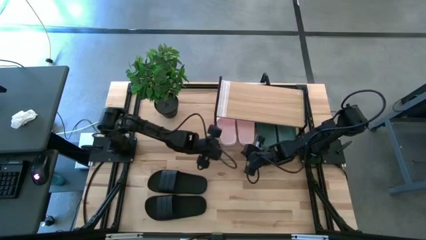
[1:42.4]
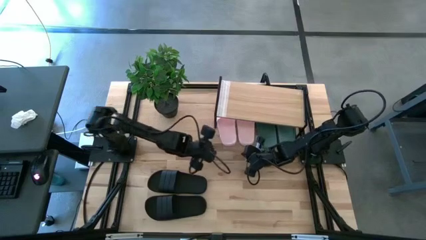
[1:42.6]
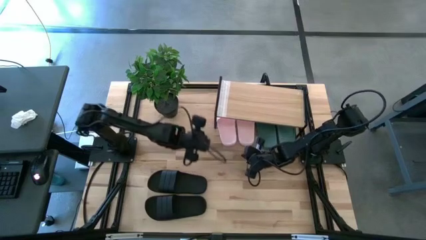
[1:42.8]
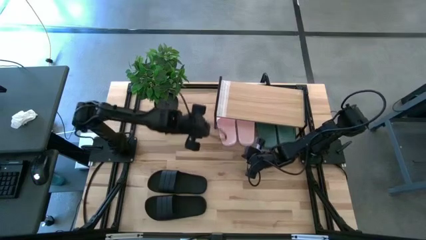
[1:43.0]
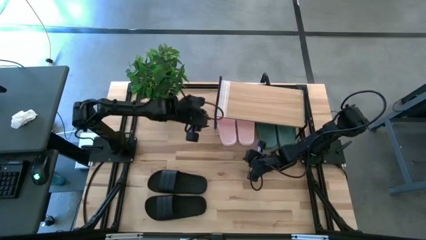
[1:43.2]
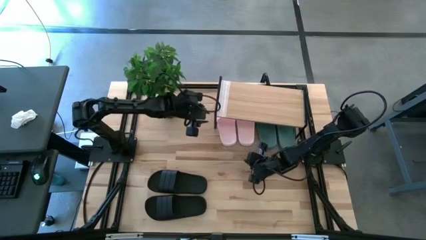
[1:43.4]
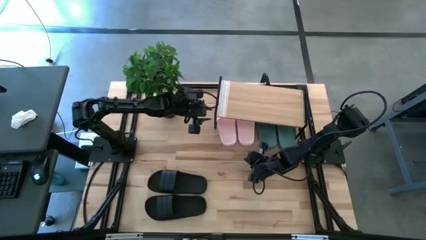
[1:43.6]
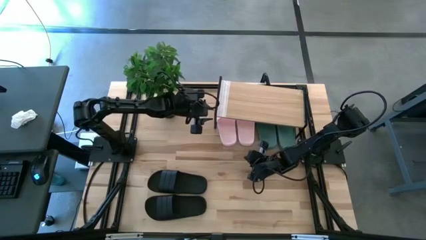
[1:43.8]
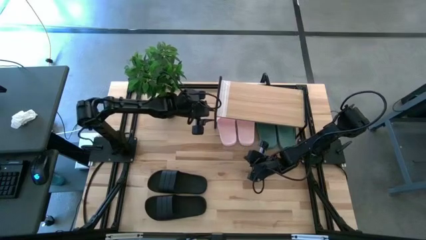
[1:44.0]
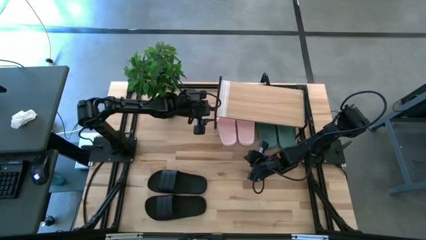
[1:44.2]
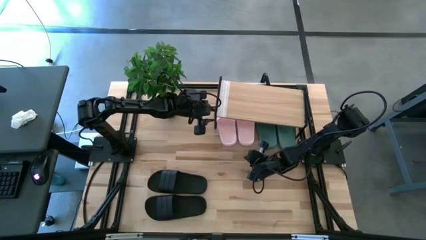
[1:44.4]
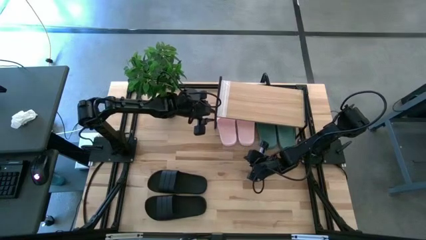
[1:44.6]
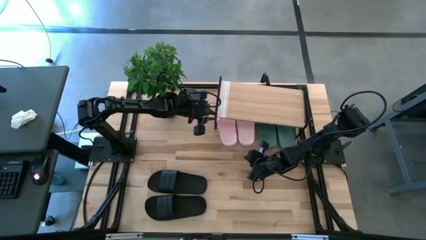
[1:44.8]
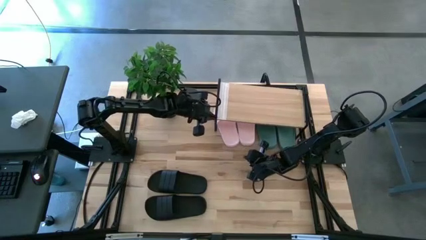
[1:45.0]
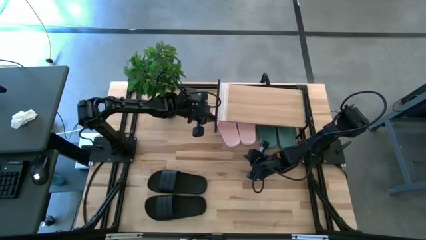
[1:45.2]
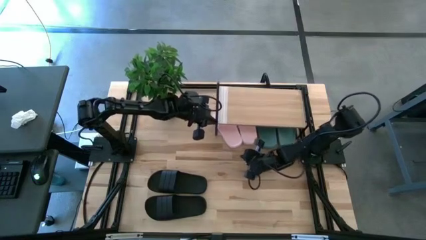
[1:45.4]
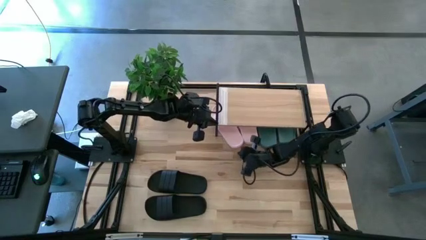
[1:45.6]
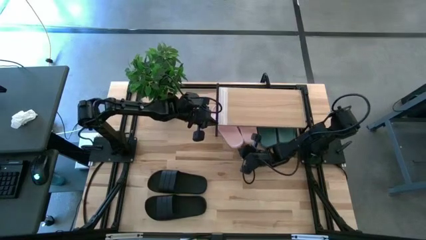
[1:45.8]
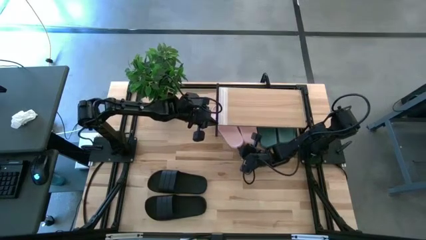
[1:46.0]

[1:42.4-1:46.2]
Task: Pick and place slides into the shelf
Adjust the shelf

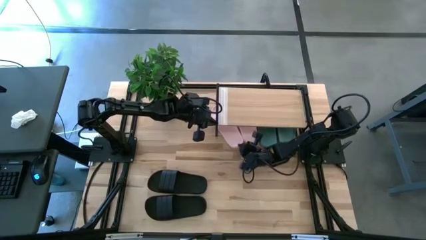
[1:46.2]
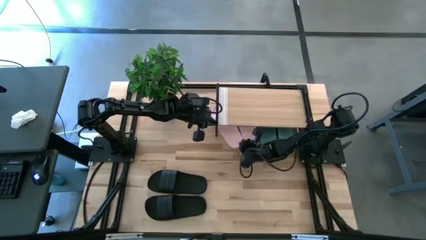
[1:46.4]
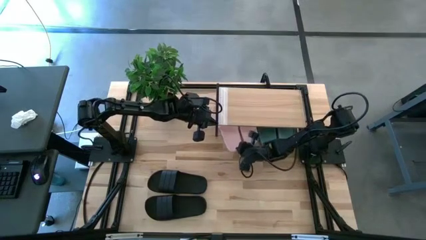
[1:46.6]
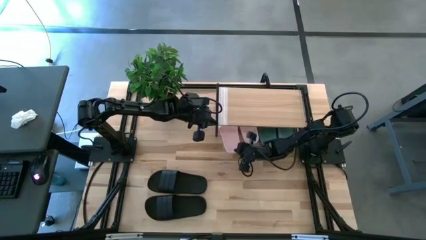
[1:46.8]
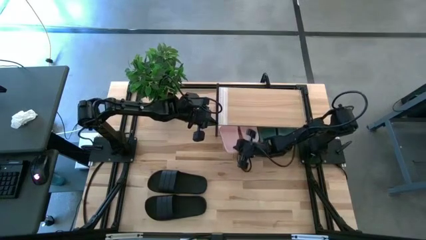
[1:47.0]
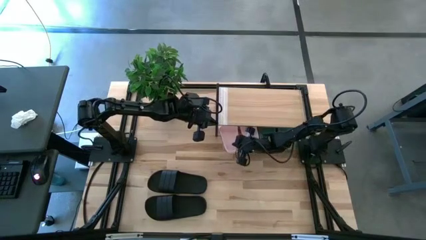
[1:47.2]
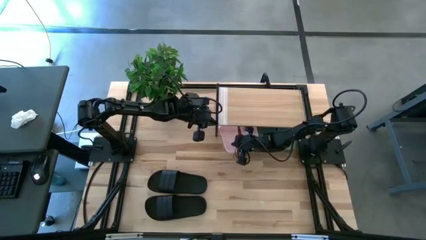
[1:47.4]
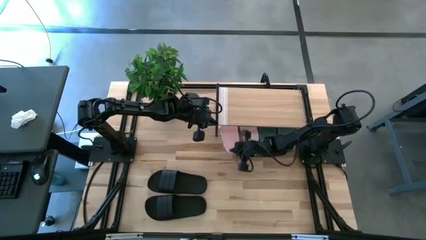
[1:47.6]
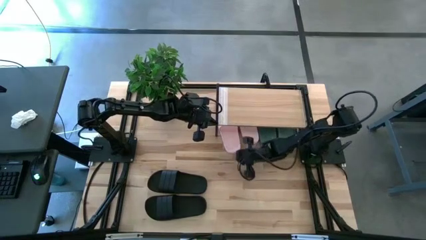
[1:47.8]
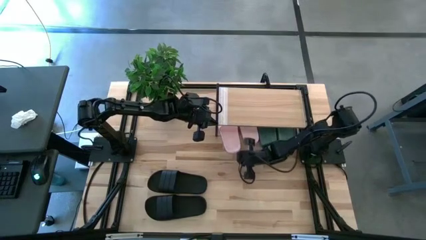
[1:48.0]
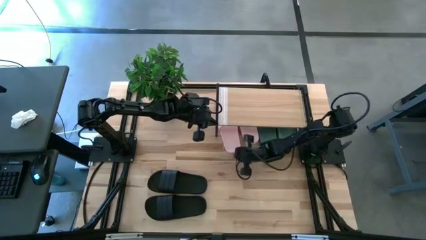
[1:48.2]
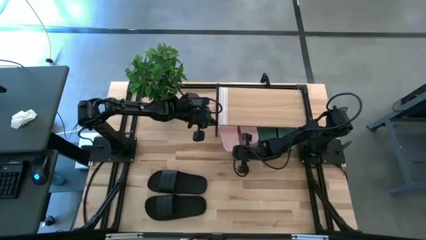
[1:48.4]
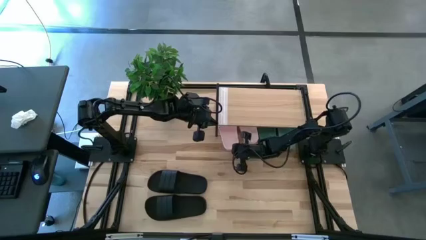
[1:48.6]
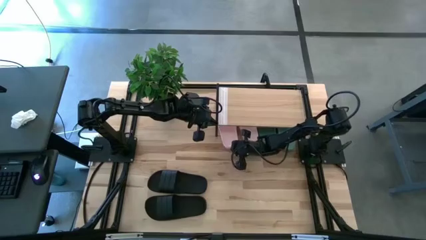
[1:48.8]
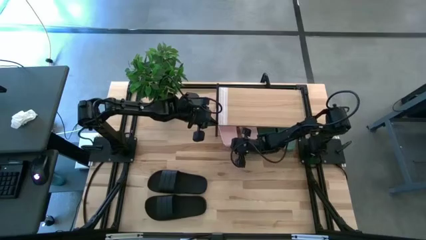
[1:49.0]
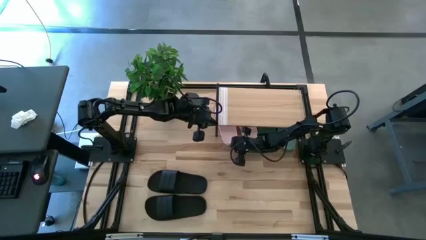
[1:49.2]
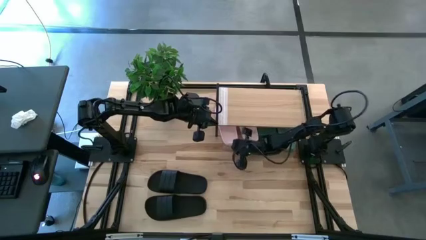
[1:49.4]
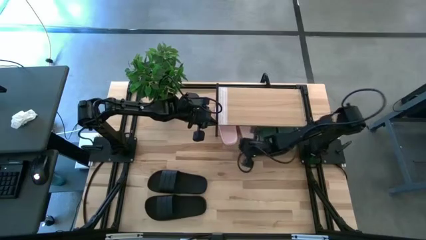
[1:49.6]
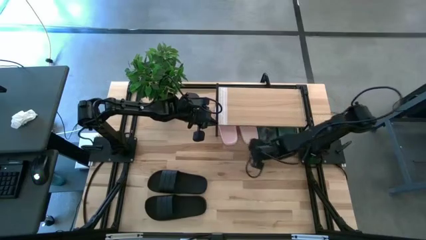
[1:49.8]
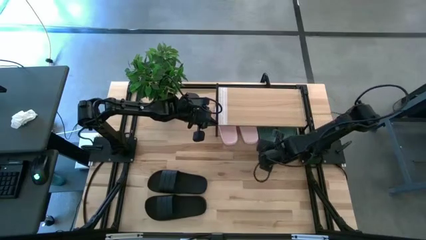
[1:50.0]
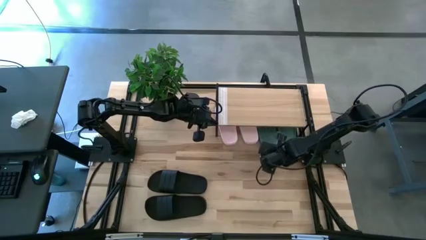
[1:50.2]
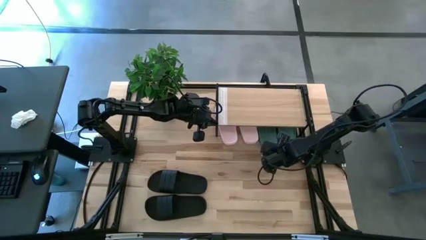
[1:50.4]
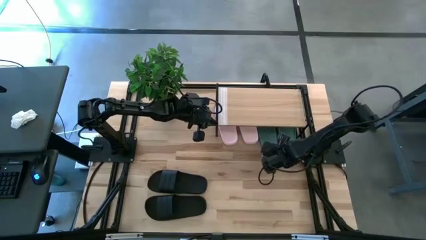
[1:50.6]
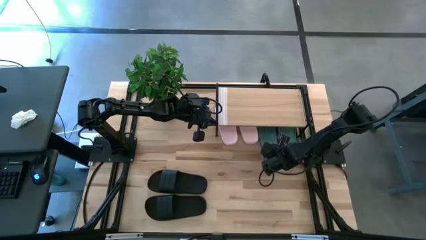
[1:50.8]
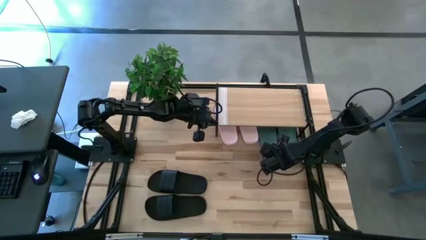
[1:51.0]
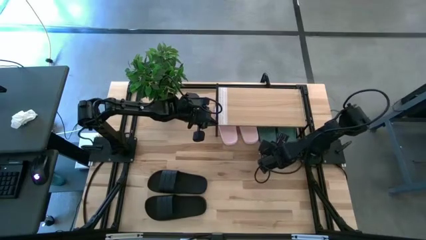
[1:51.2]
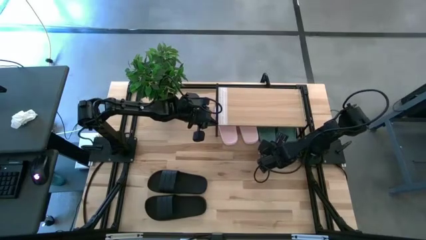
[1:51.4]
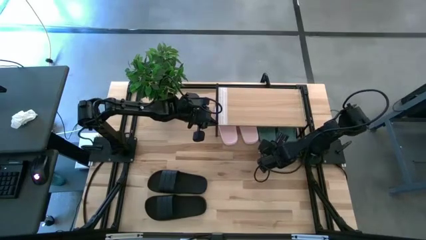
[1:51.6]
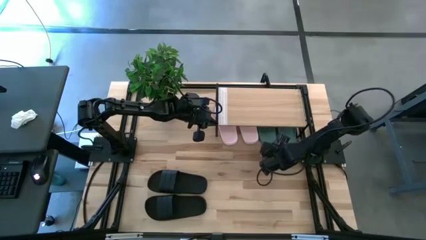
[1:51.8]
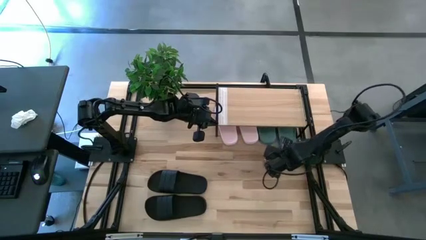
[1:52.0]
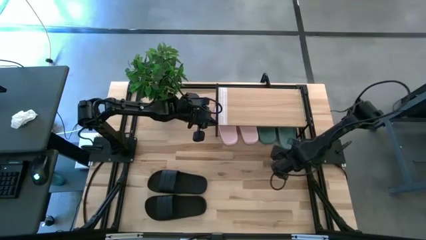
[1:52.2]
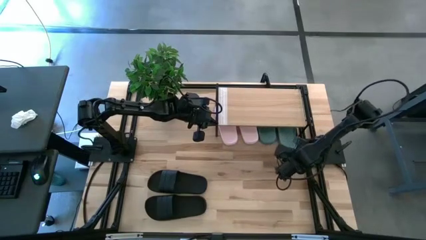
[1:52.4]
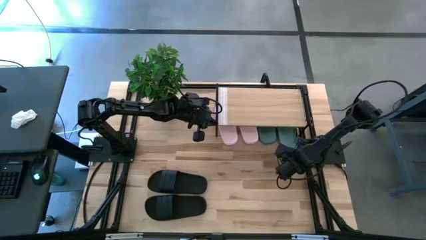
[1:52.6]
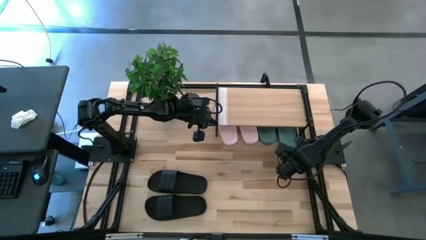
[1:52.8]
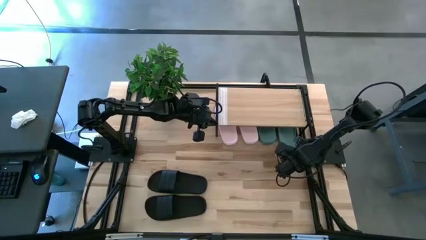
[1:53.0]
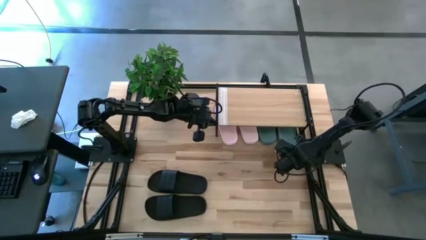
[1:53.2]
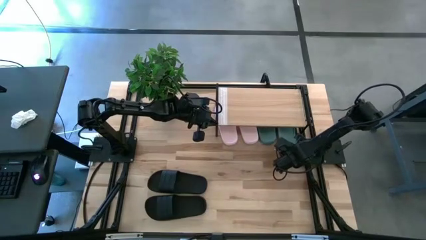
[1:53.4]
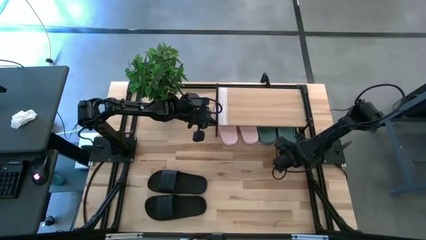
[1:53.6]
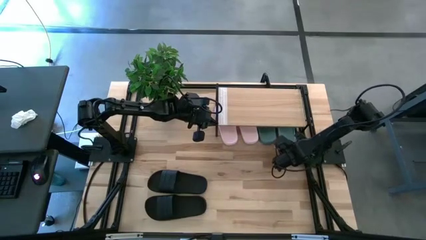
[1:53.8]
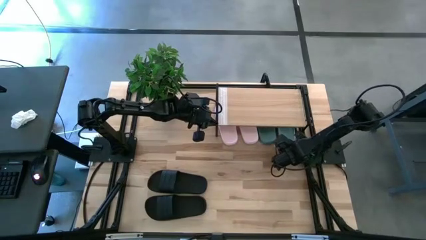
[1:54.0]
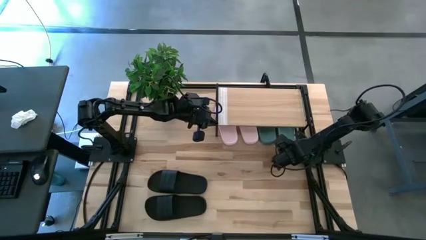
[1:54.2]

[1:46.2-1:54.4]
Adjust the slides

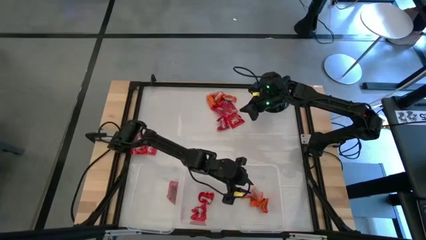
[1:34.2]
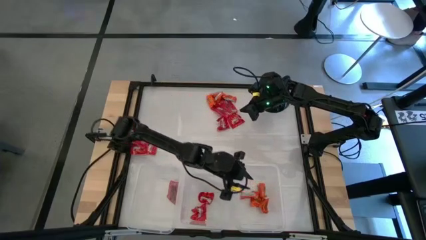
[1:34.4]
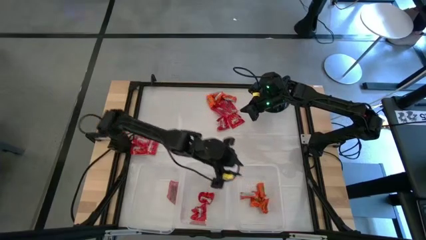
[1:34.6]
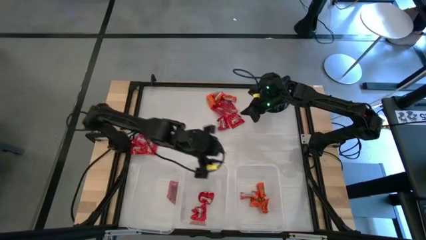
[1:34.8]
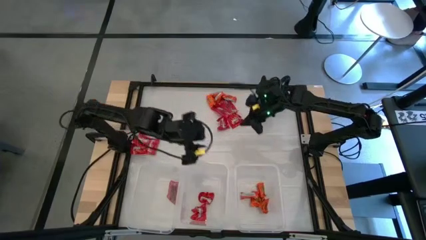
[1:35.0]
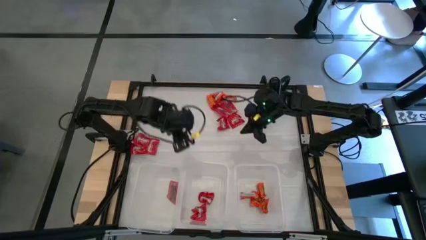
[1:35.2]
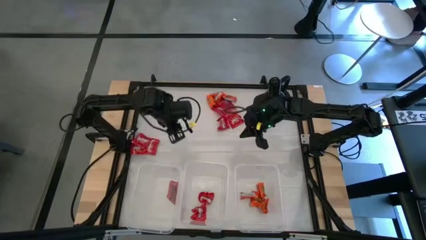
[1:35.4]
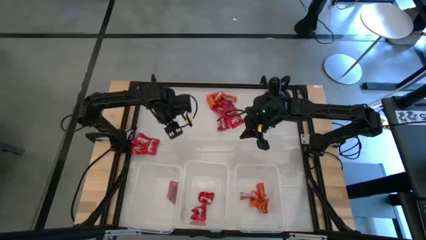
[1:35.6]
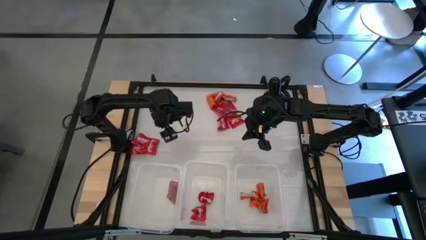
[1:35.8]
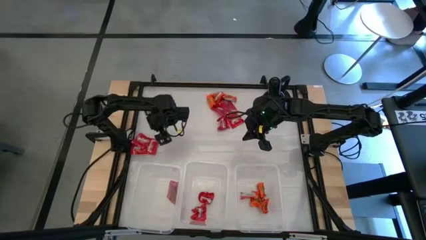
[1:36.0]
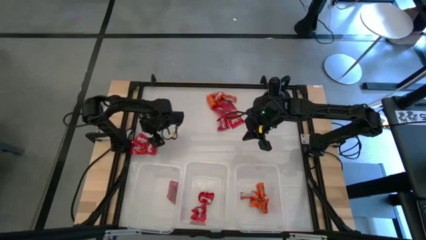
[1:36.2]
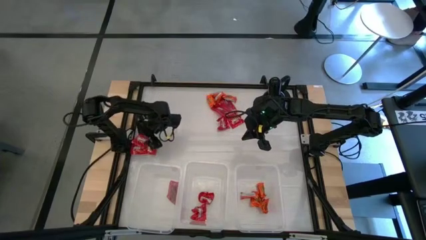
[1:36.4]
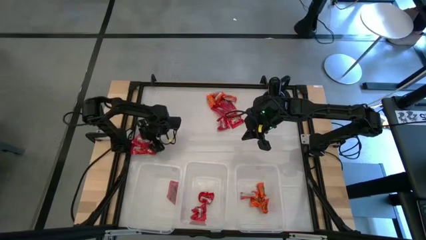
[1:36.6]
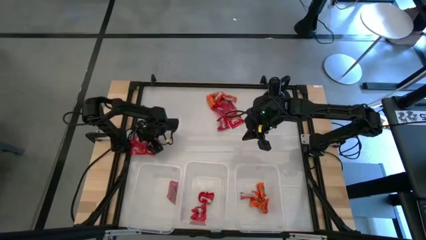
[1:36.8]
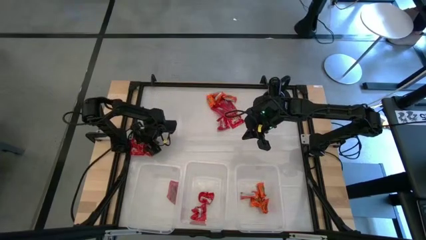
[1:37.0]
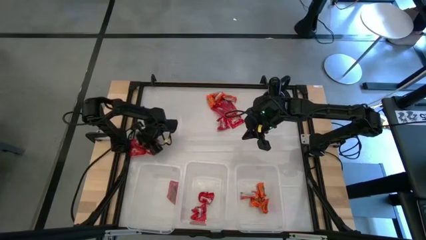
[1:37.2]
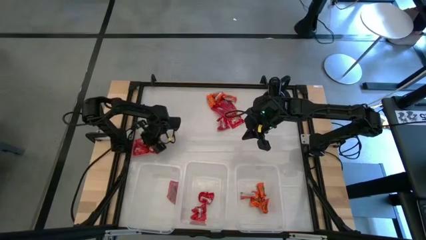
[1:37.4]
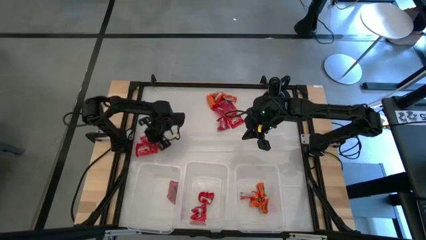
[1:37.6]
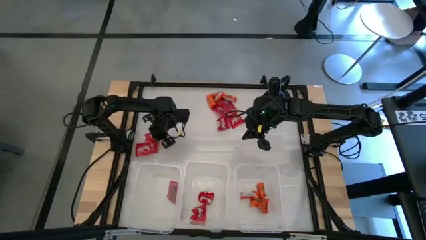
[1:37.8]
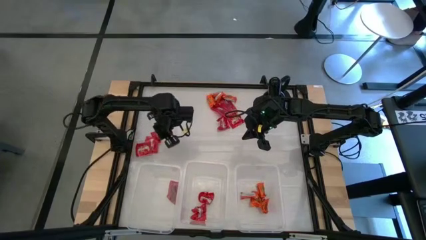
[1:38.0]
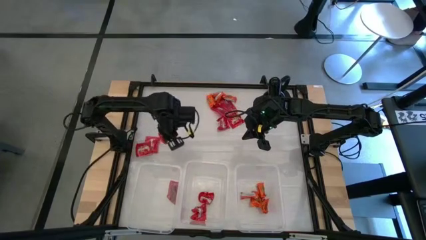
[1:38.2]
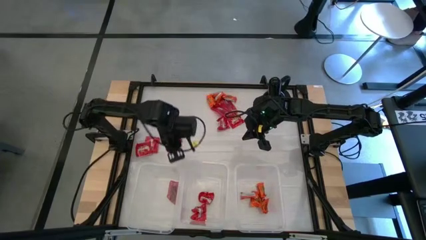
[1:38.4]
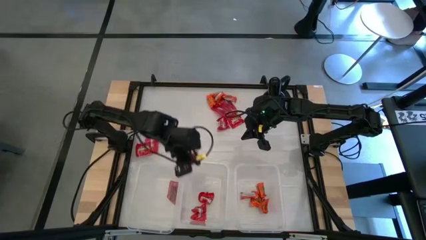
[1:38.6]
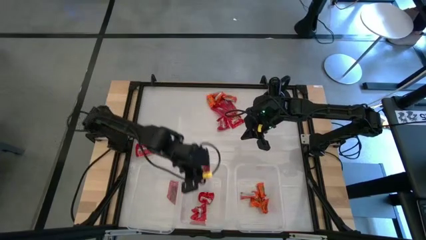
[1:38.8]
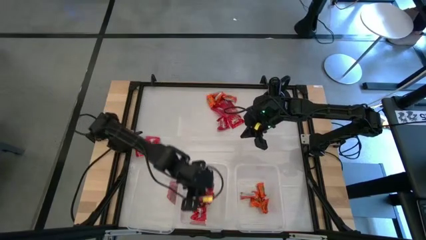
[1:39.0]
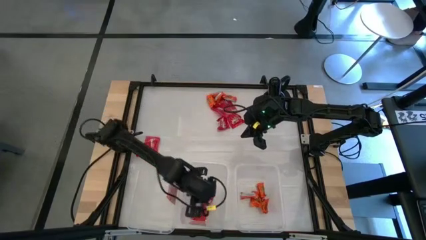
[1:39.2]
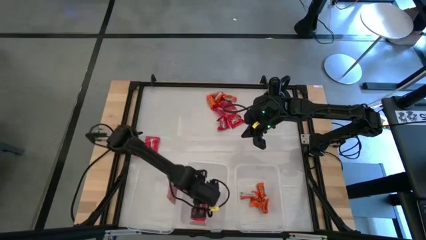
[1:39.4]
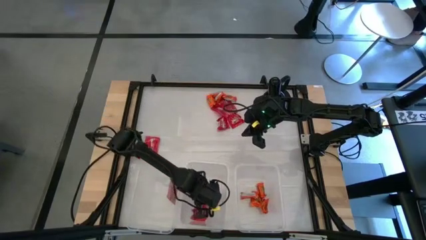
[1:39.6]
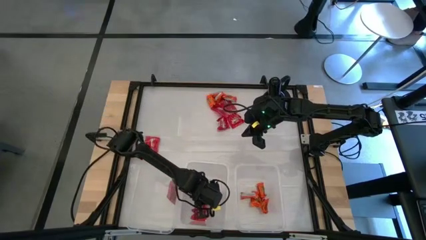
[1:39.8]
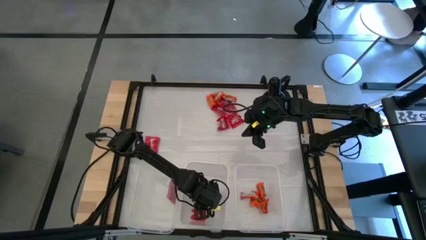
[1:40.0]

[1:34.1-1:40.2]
Task: Sort candy
Put the red candy into the middle transparent bin
